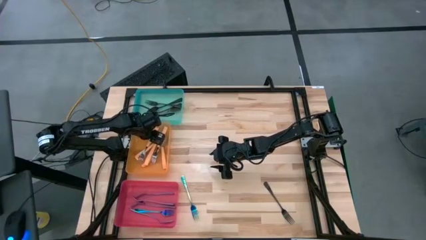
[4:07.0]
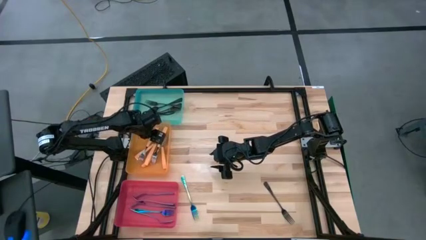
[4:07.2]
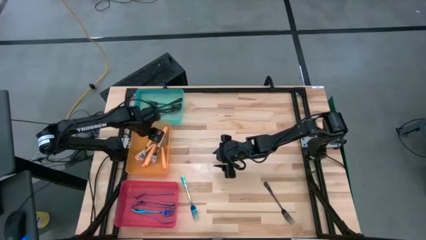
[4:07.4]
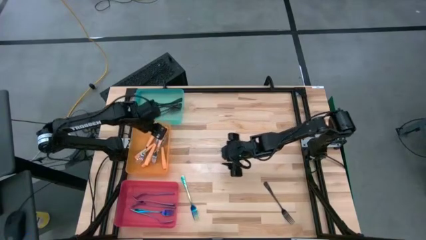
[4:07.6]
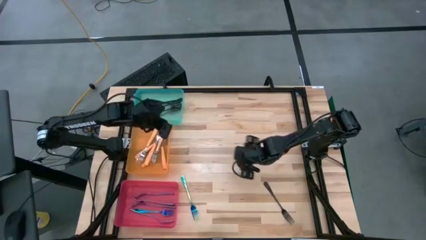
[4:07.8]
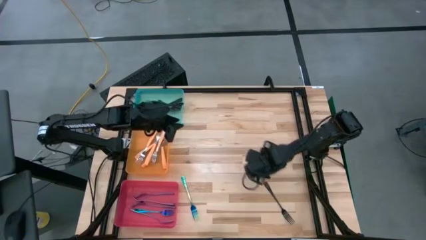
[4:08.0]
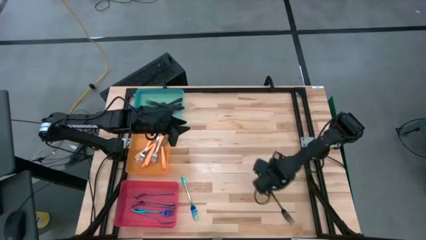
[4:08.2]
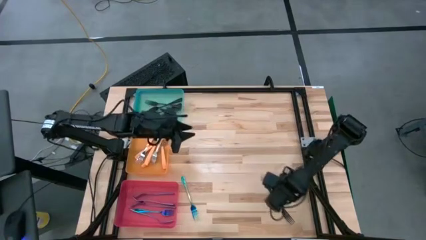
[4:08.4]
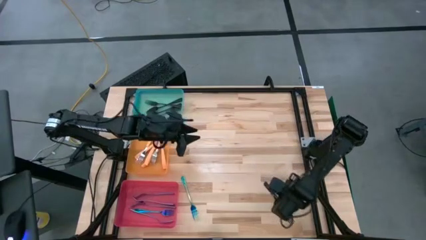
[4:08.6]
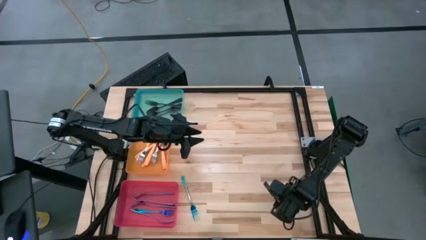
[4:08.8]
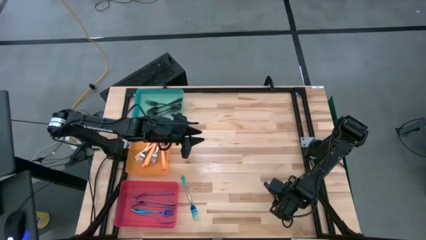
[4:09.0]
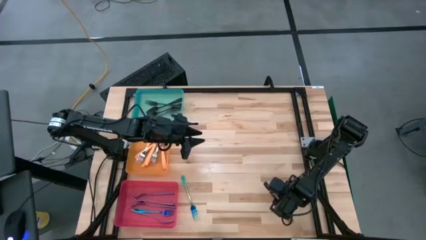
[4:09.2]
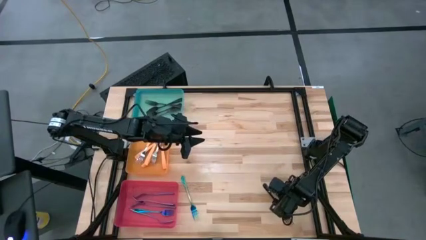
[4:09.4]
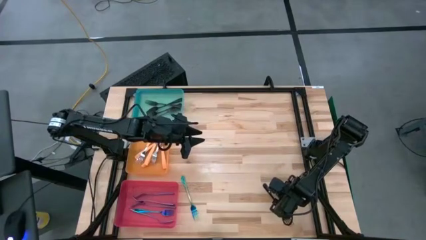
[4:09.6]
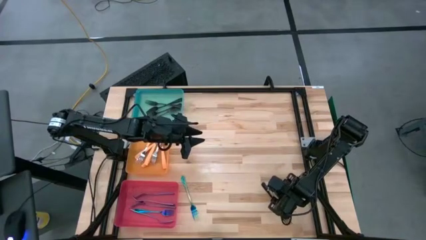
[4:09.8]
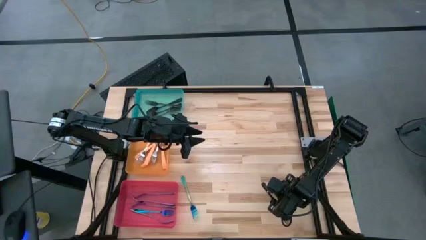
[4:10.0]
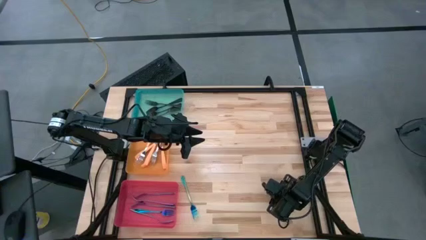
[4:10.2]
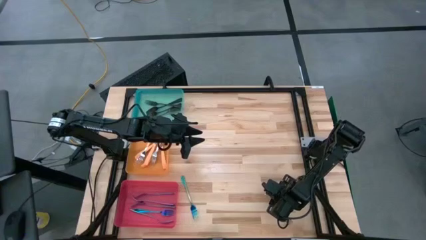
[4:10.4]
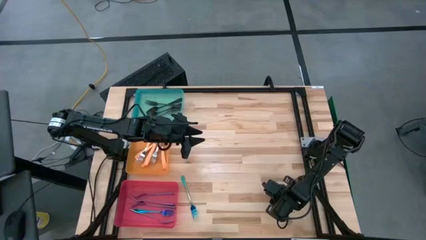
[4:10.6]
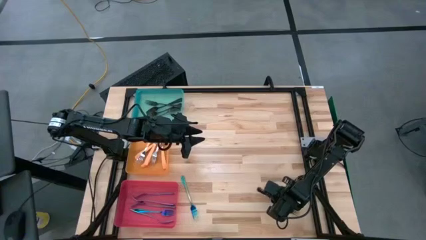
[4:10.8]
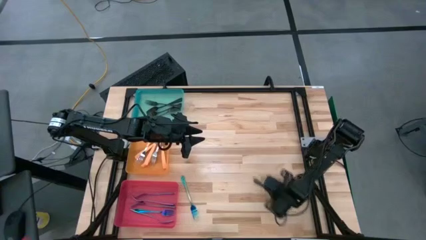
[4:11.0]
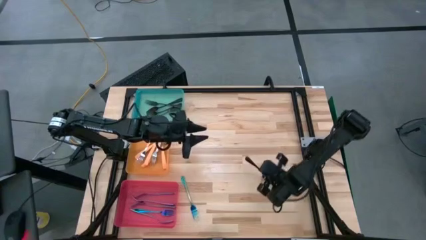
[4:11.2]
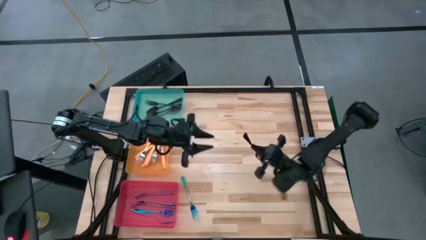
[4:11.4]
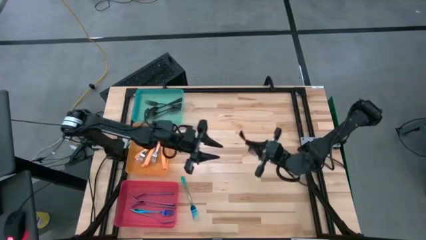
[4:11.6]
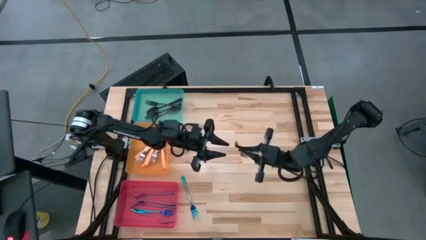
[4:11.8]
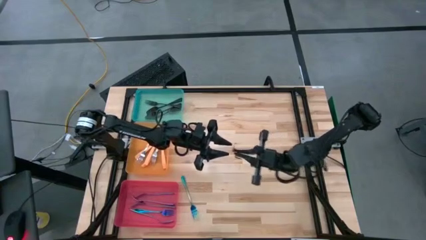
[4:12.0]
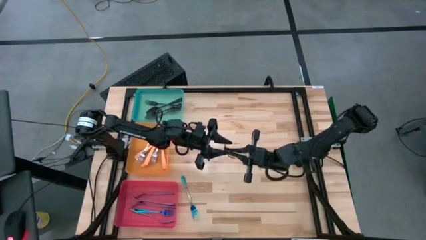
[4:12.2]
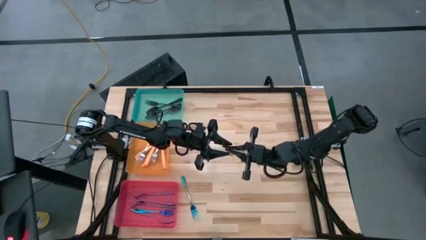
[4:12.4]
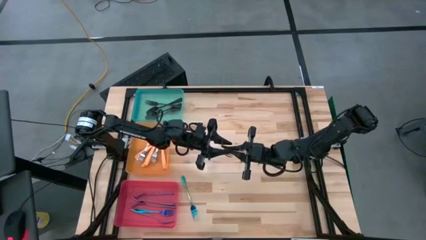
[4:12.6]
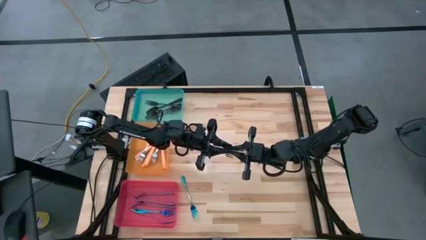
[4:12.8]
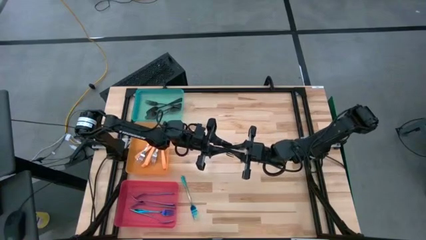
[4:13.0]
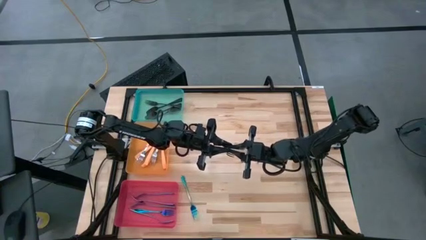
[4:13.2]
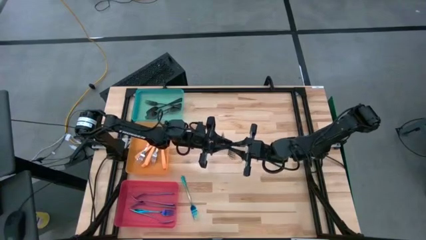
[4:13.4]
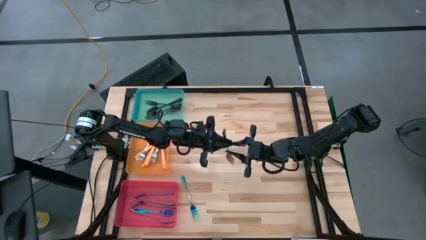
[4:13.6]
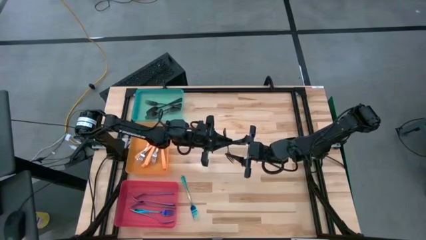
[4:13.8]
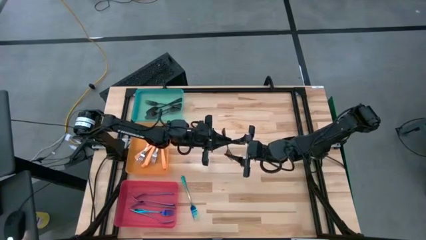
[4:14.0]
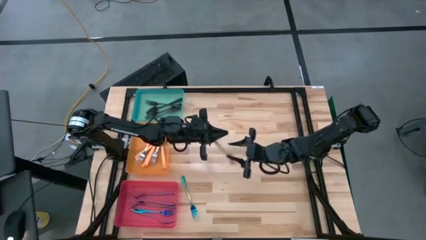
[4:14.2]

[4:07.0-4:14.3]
Task: Sort silverware by color (type)
Put the black fork into the blue bin

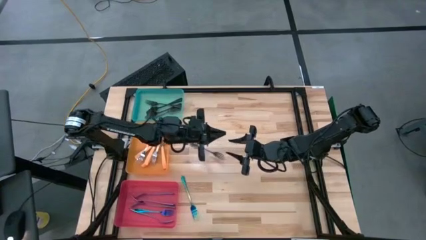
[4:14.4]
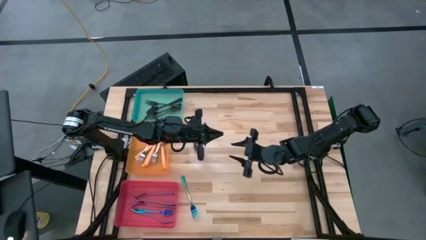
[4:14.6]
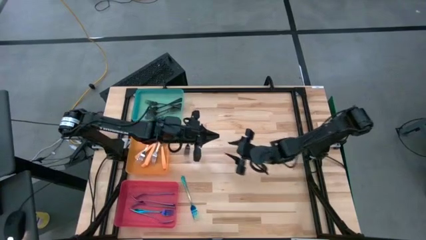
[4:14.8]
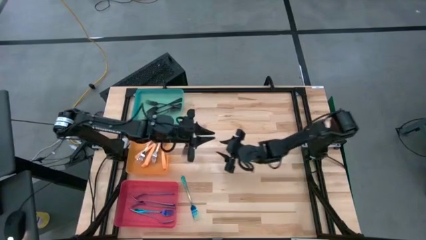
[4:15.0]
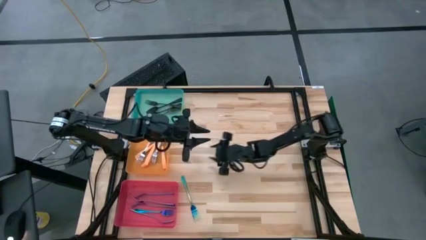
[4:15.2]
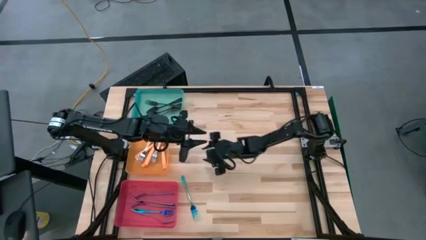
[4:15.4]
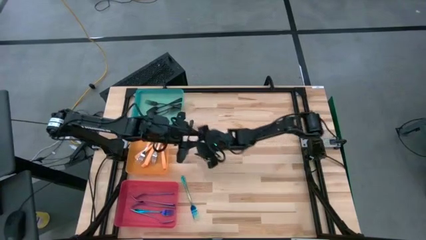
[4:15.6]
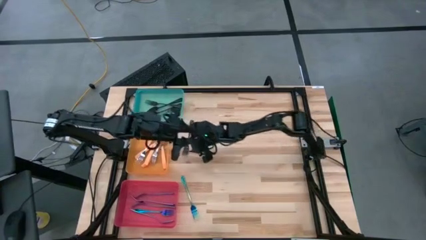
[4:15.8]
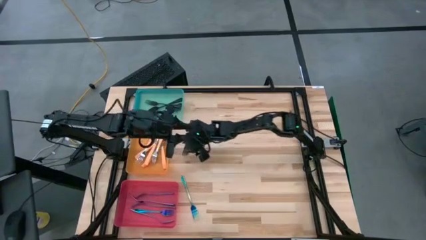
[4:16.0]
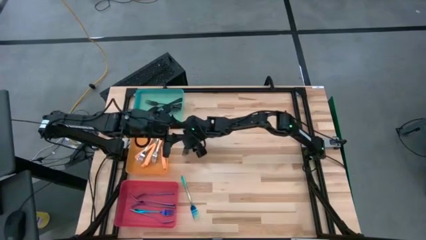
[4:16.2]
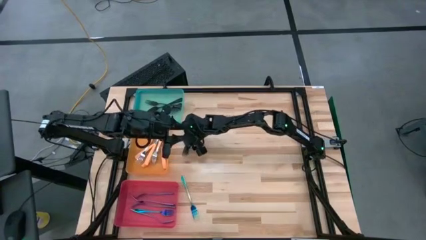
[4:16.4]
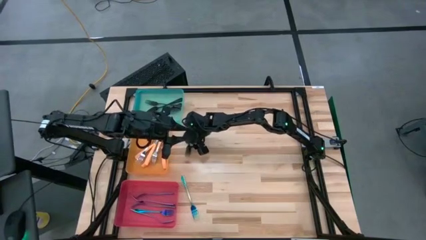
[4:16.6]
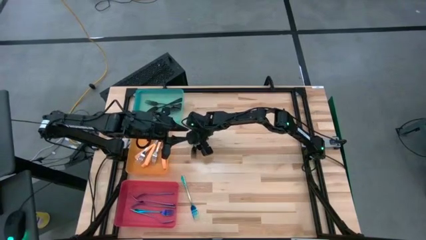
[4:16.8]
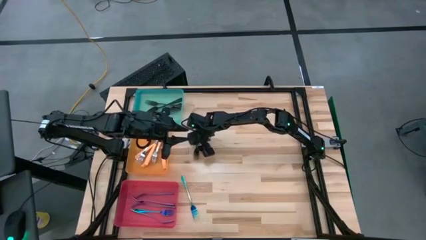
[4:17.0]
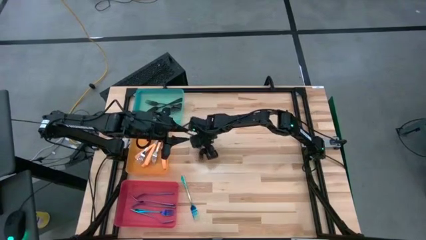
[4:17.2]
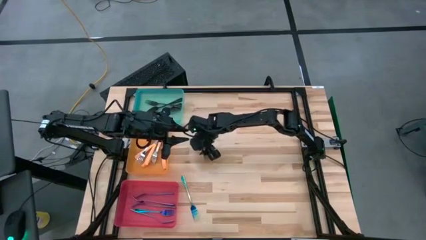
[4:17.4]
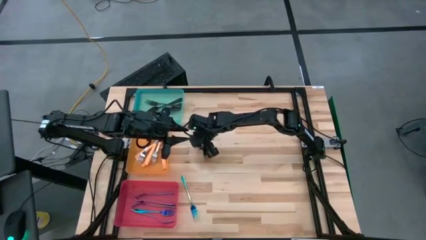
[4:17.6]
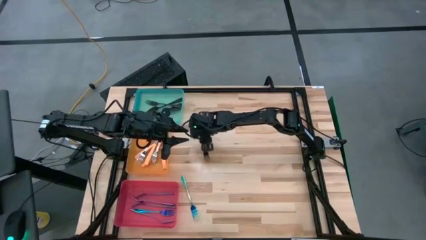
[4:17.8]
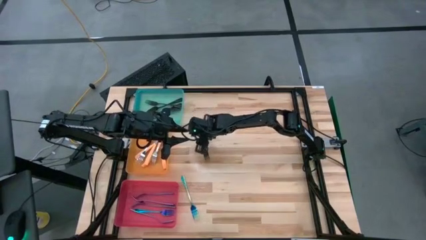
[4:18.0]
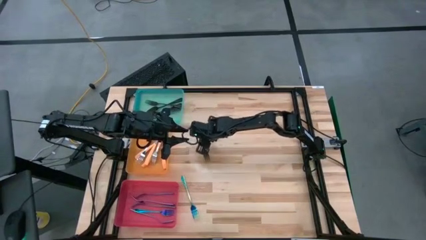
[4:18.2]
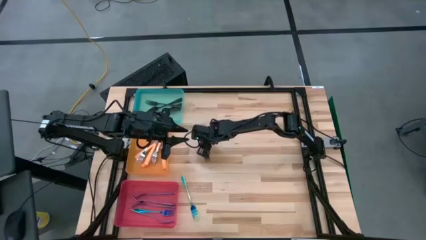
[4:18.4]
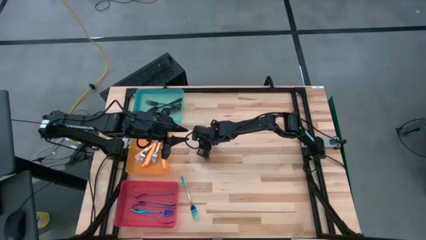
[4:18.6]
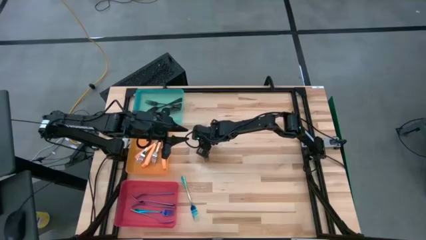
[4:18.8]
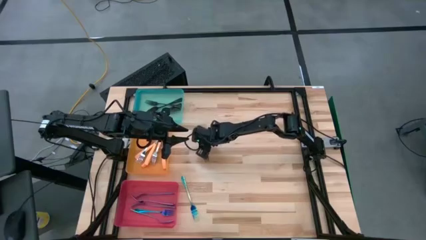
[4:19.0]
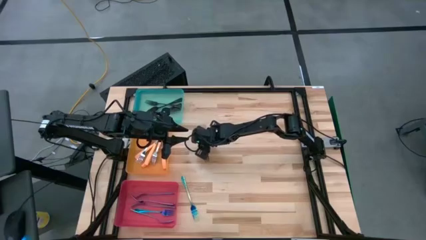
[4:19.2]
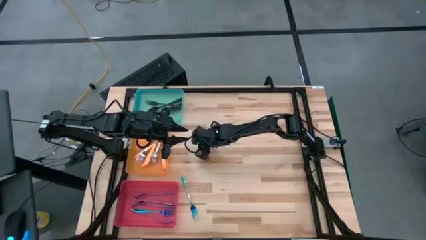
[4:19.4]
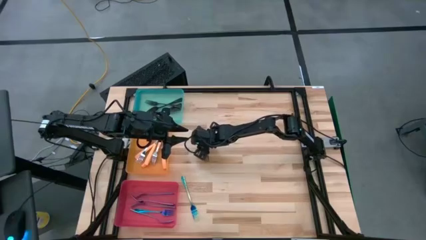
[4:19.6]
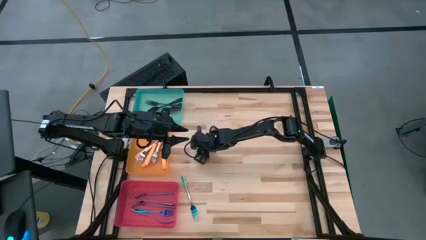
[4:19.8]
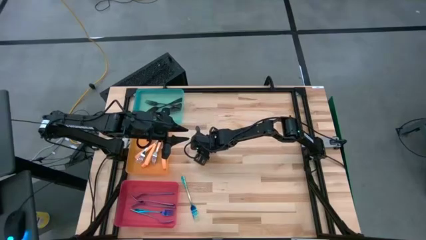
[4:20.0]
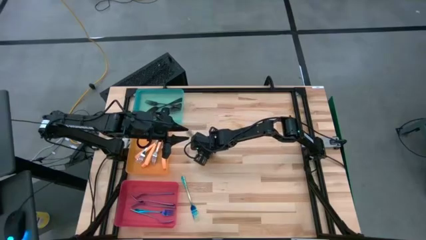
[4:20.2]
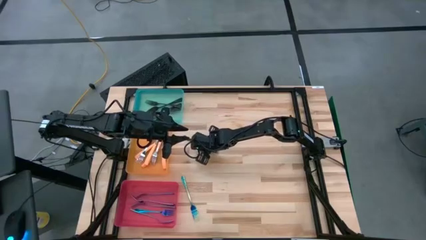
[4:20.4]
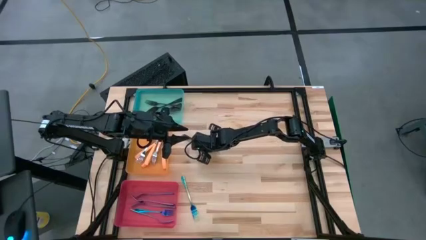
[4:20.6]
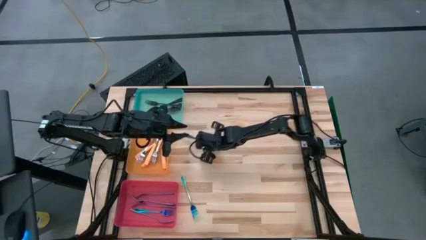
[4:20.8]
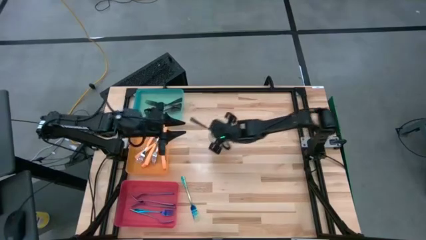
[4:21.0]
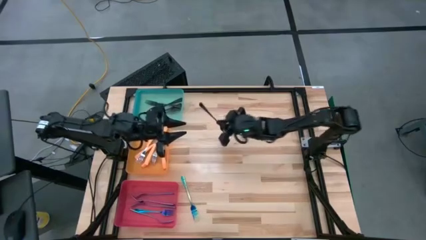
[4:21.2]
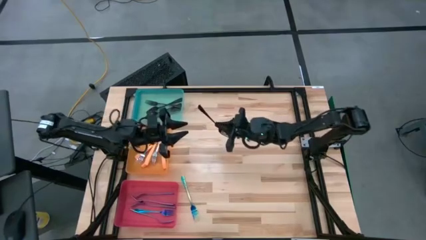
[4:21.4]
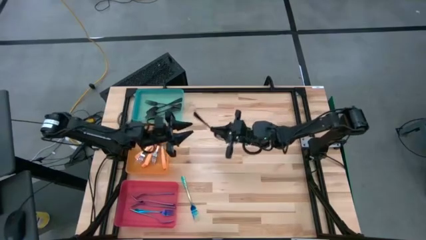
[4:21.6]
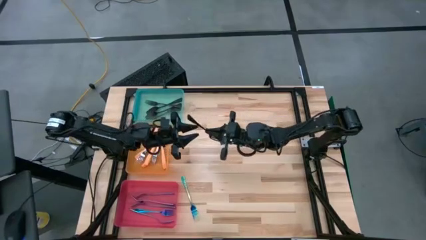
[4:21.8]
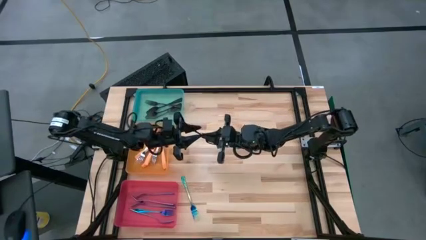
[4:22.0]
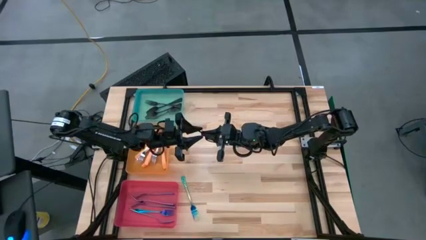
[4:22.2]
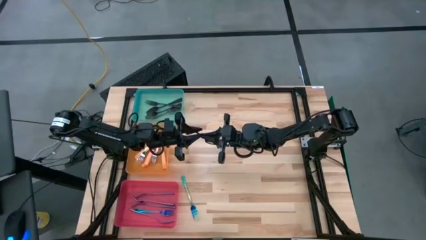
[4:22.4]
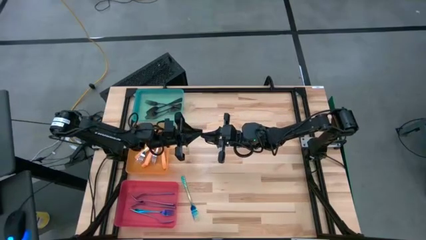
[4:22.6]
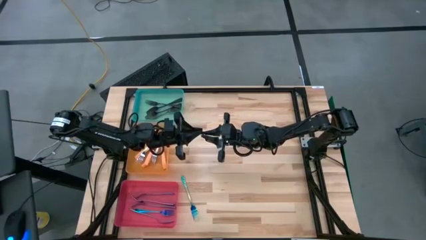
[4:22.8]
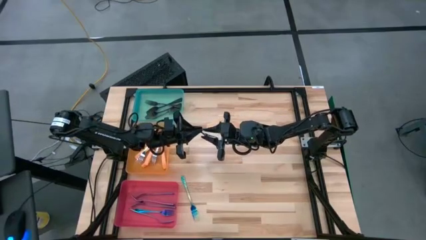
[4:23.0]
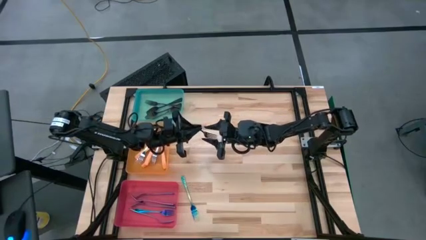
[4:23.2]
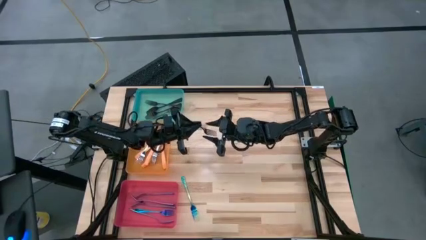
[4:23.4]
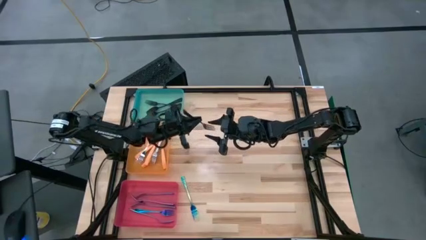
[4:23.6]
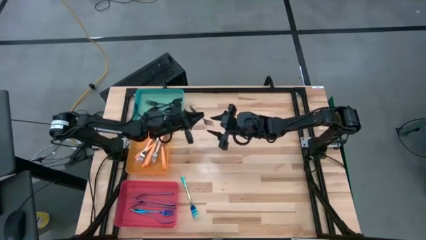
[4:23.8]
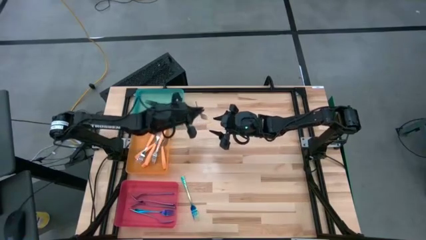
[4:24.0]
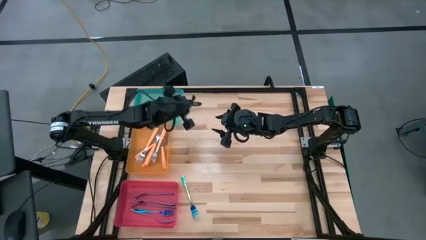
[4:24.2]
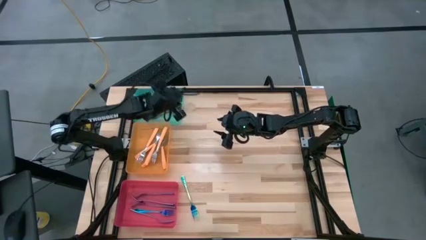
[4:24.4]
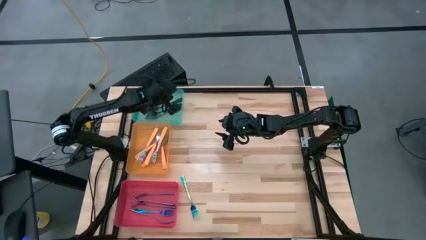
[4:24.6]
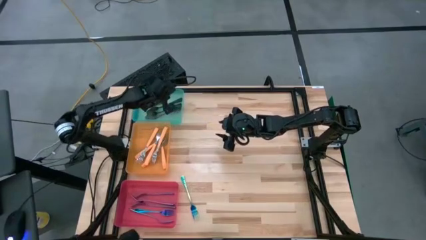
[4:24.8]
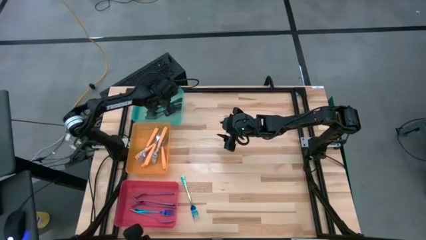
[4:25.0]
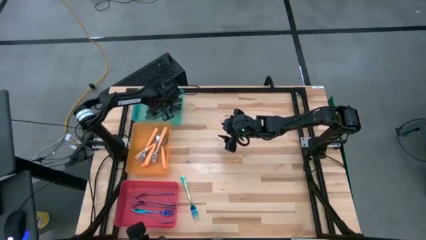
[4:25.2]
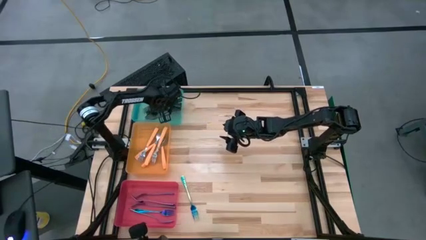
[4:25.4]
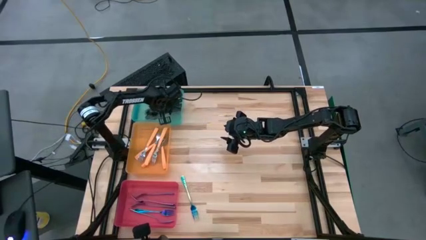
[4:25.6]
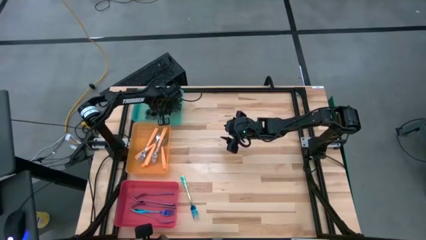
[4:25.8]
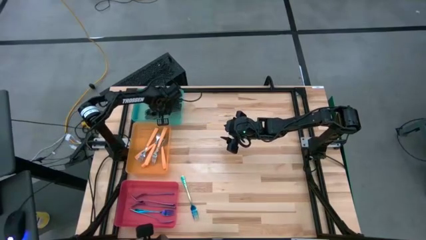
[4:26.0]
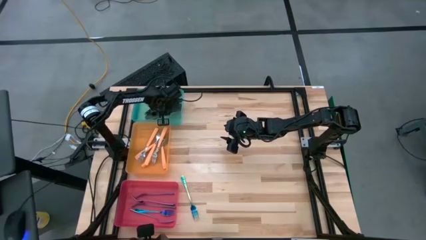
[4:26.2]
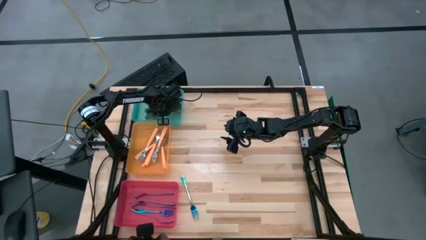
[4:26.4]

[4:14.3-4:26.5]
Put the black fork into the blue bin
